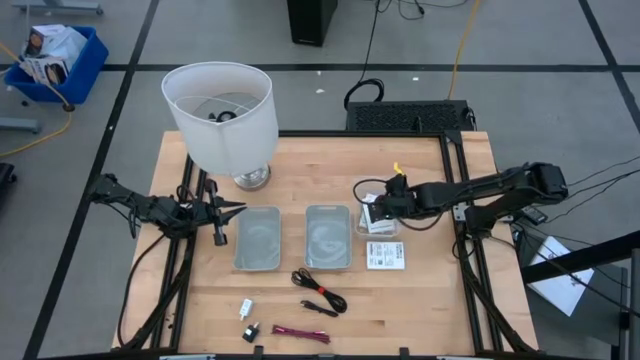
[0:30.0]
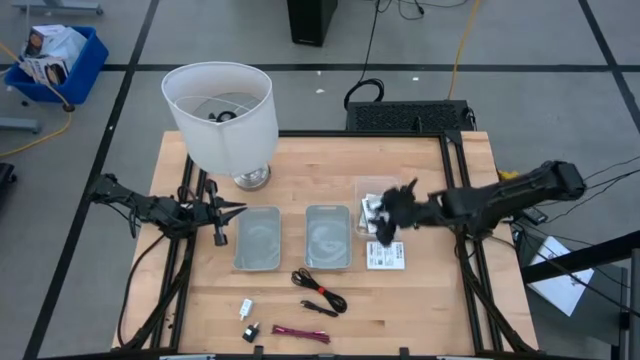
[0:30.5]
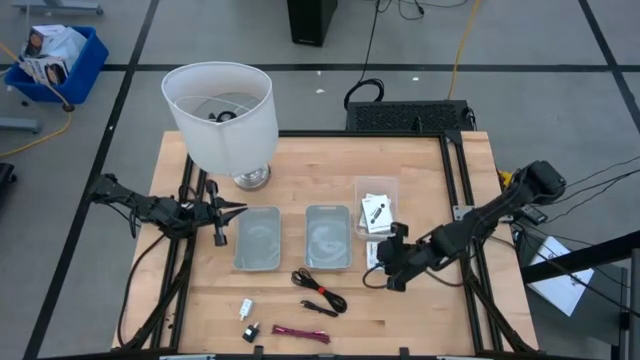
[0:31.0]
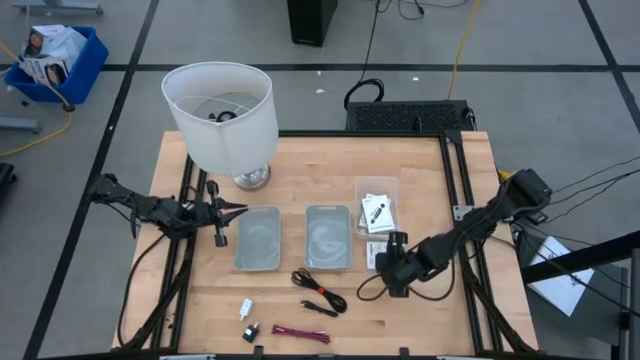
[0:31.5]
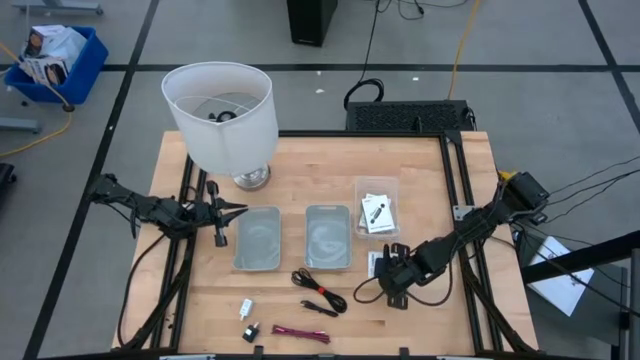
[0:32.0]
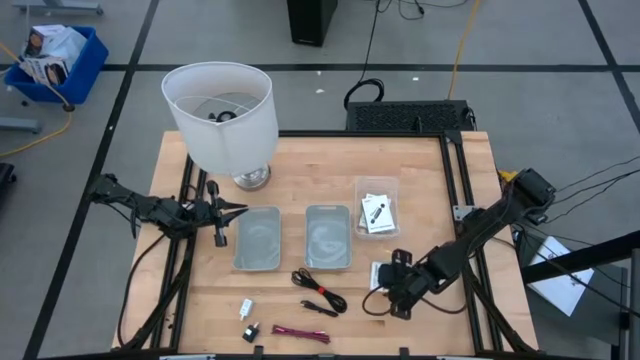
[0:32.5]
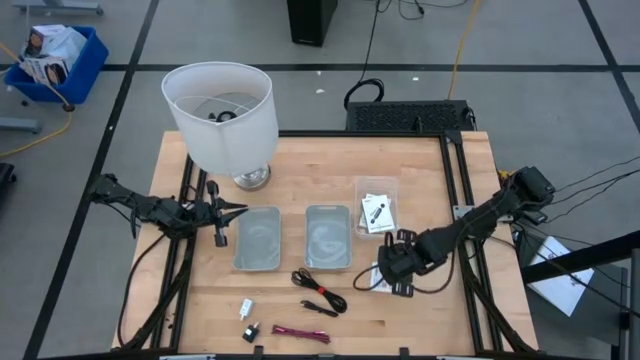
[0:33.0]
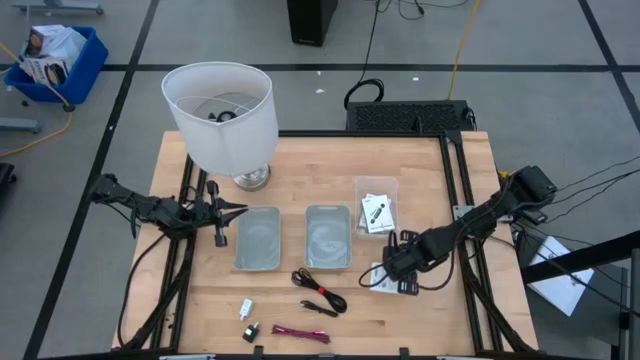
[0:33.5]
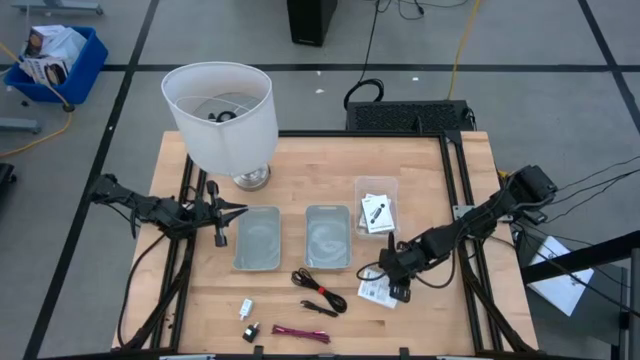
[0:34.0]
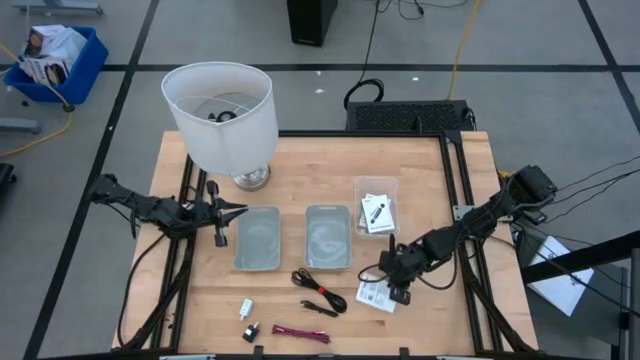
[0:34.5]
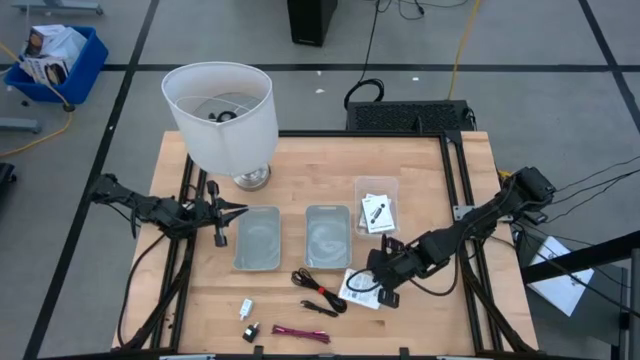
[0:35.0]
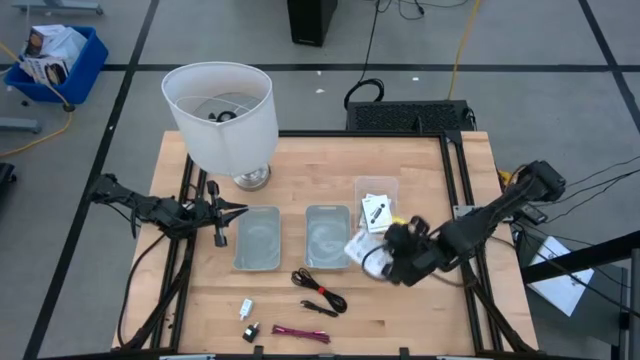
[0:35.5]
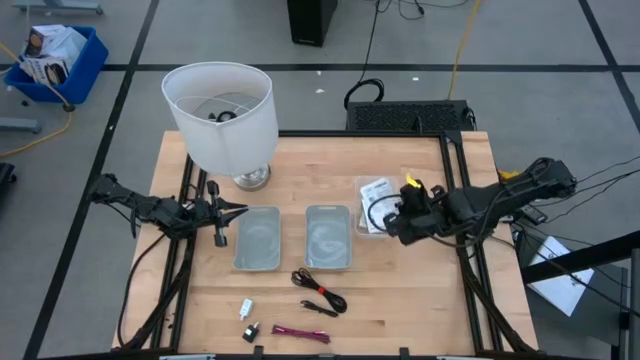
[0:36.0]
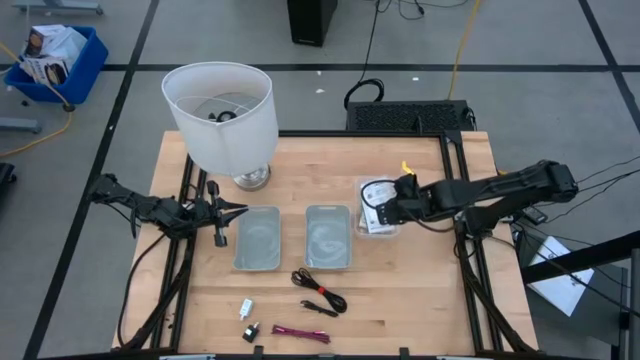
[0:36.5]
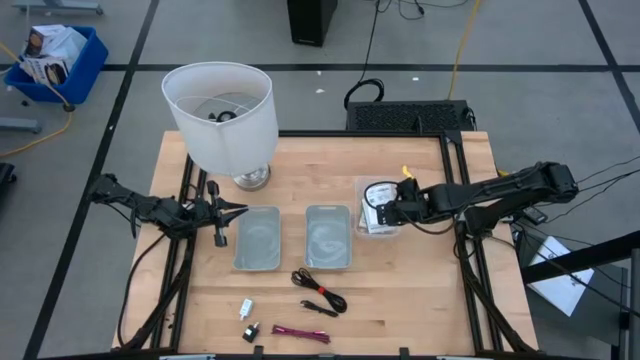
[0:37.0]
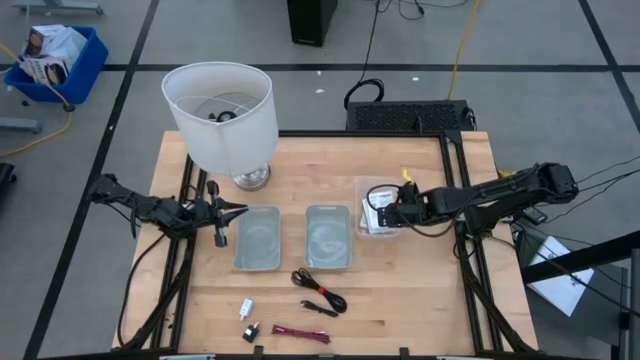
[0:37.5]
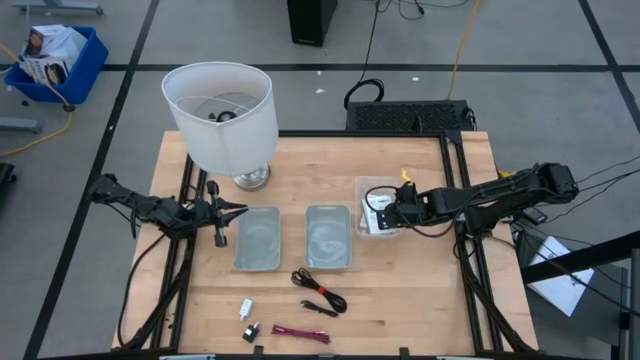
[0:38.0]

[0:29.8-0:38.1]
Task: Pick and place items into bin
Put the white card reader box into the transparent bin

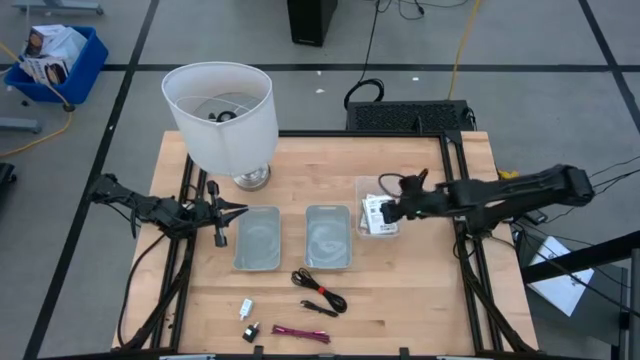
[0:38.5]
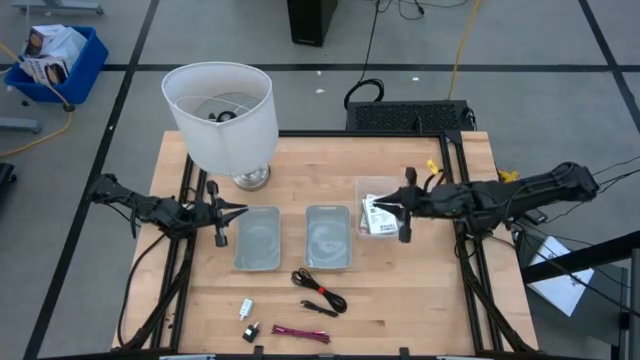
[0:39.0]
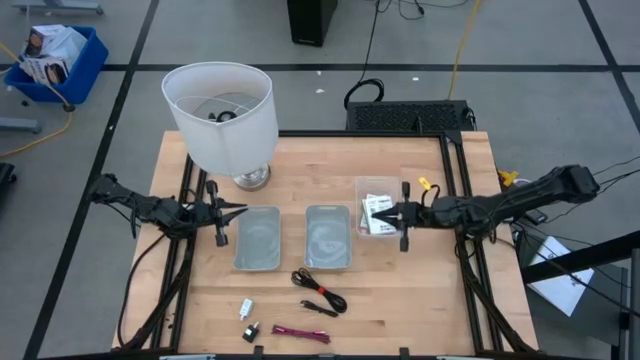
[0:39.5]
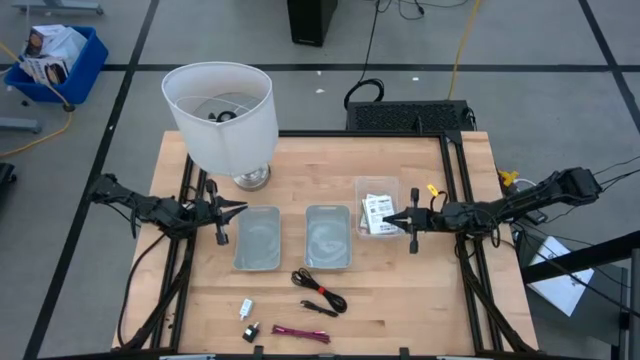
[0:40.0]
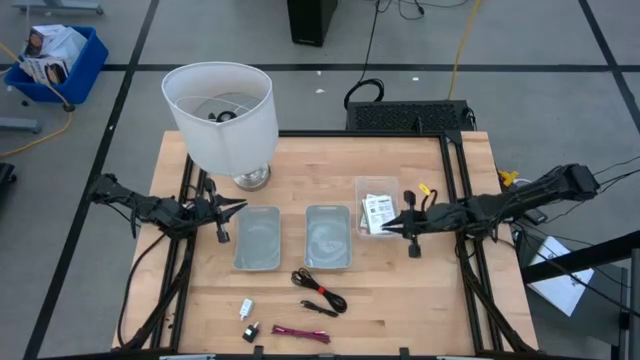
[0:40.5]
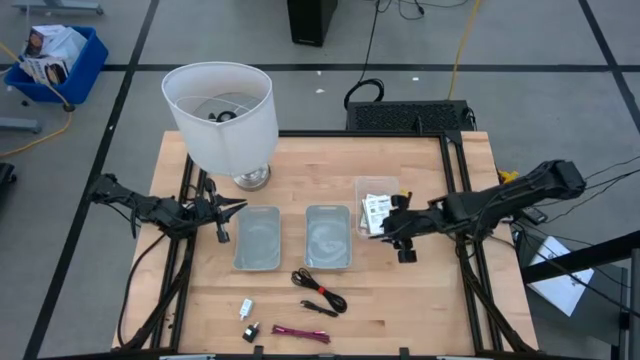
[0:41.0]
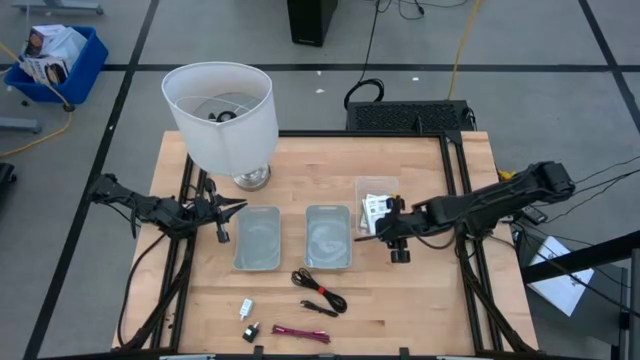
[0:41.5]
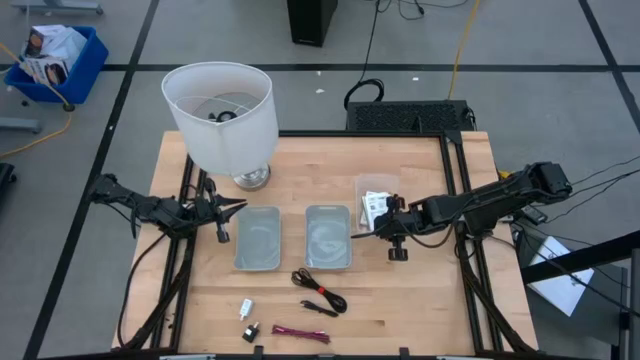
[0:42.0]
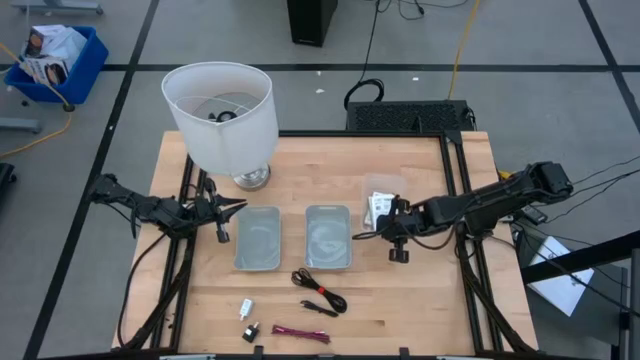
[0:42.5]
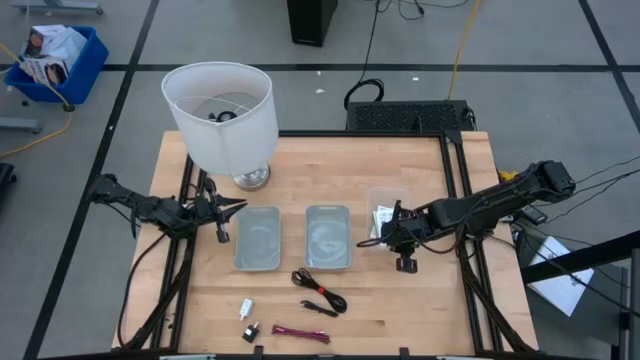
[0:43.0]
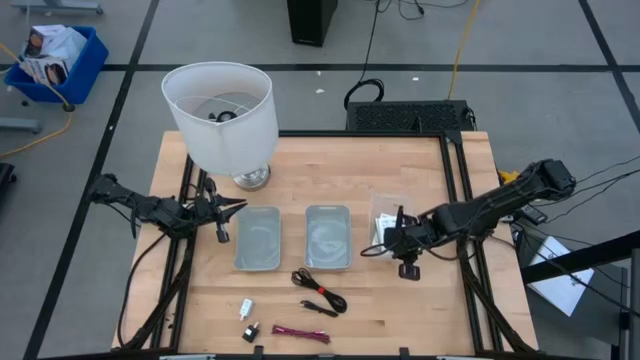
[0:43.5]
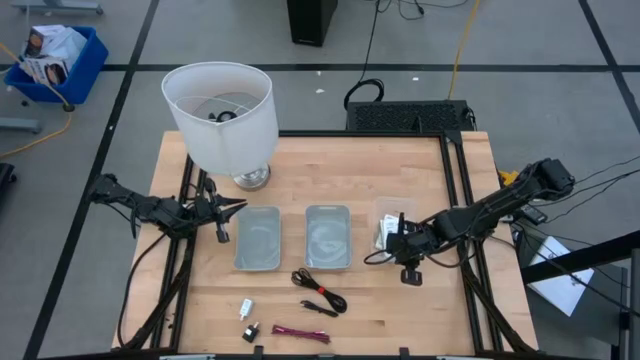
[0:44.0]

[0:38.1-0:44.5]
Adjust the transparent bin

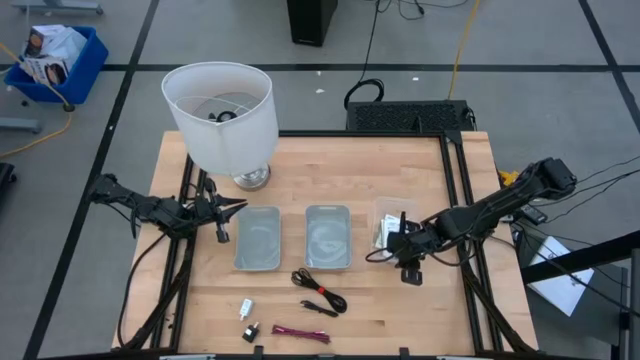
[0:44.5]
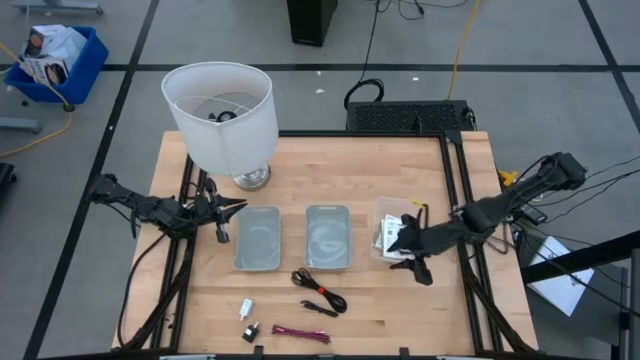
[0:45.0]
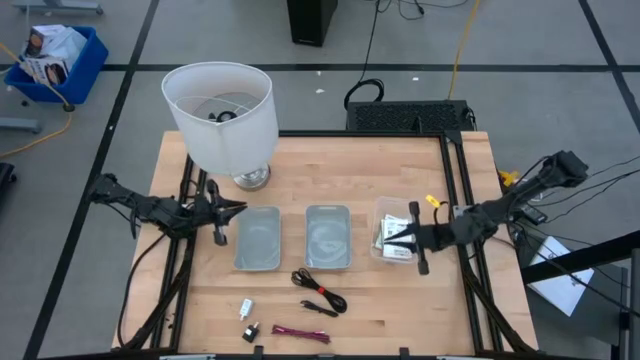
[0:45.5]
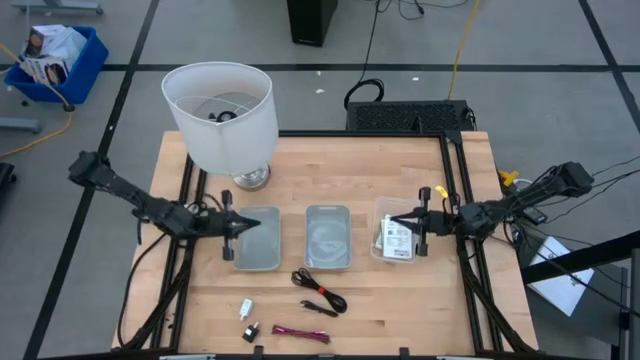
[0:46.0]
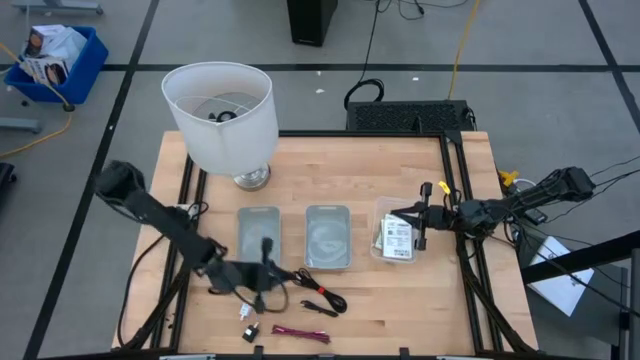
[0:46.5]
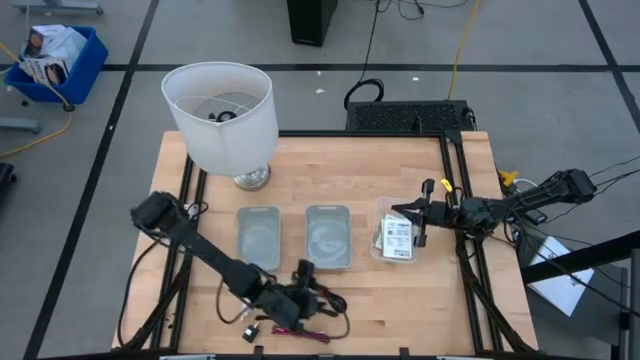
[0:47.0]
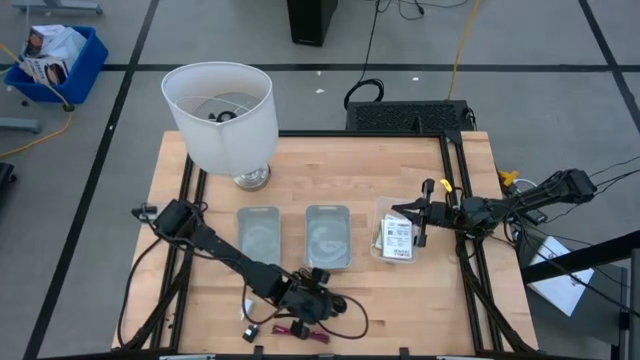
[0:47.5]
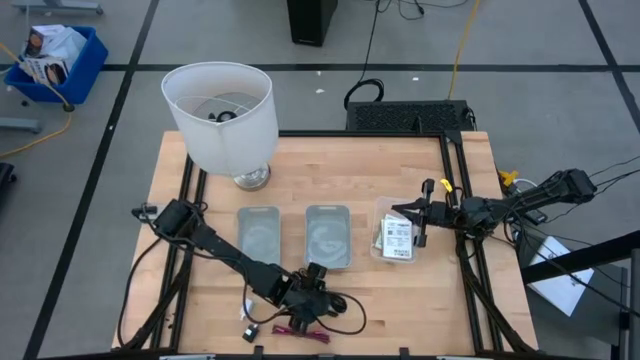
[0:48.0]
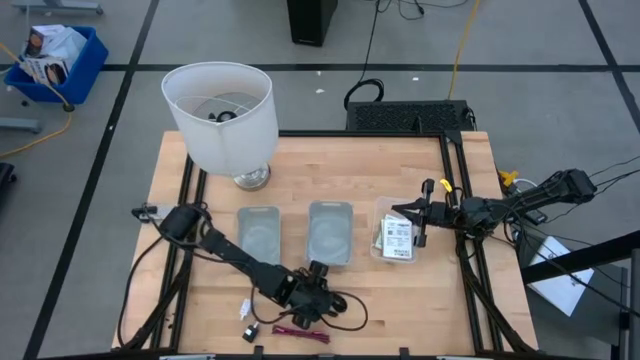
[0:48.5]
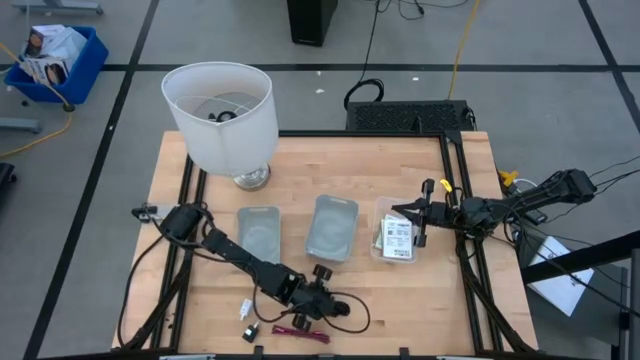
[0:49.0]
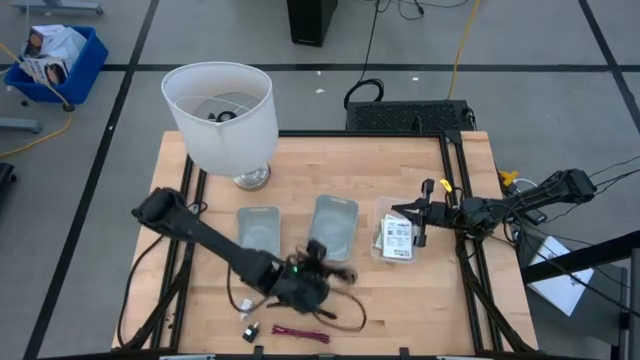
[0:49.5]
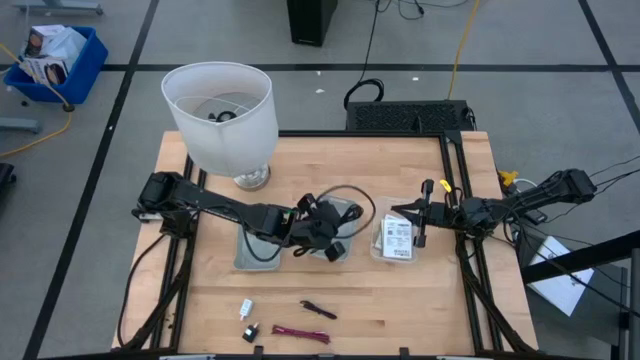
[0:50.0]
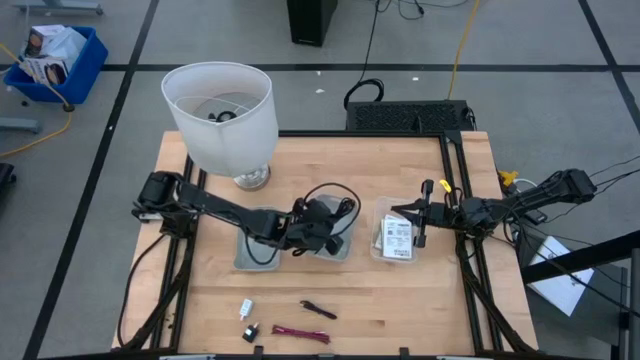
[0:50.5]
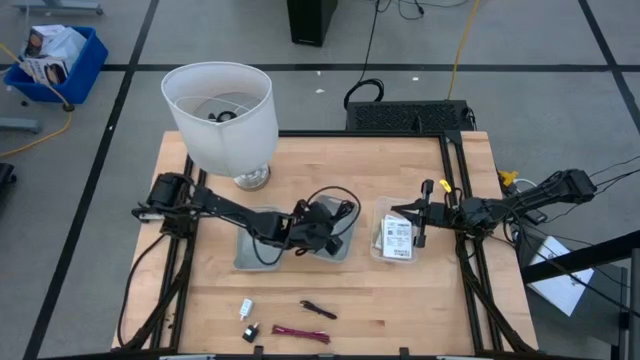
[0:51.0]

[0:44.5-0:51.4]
Put the top black charger cable into the right gray bin

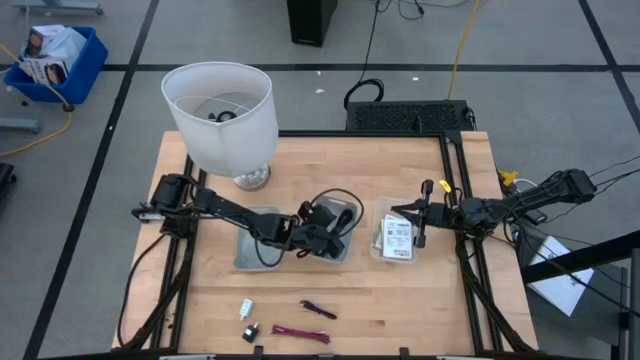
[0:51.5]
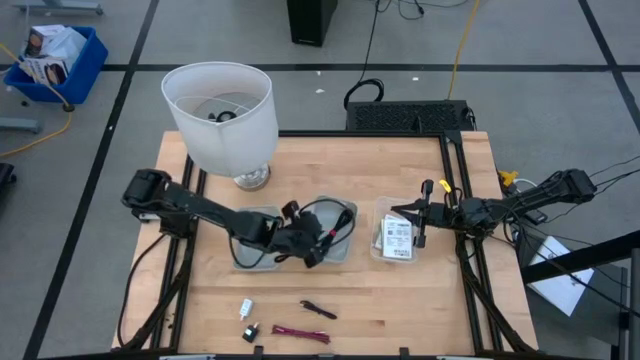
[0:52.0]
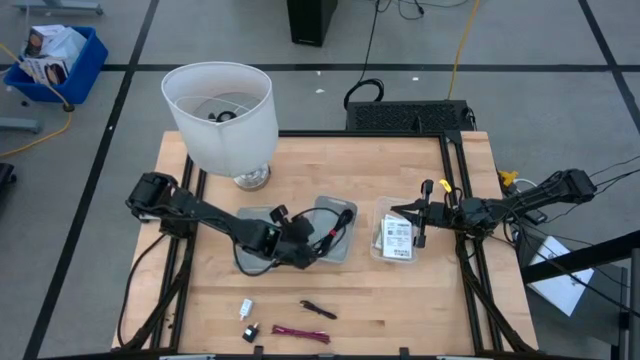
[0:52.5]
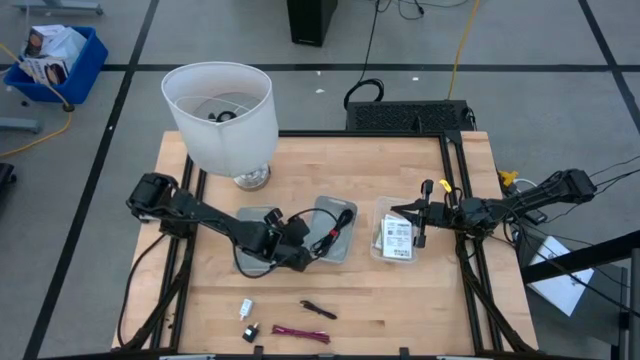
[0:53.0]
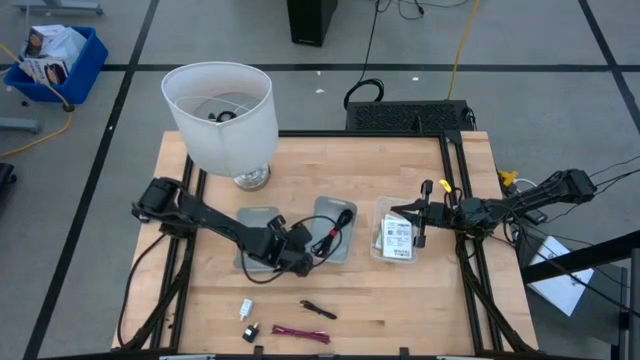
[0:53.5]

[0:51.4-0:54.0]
Adjust the right gray bin
